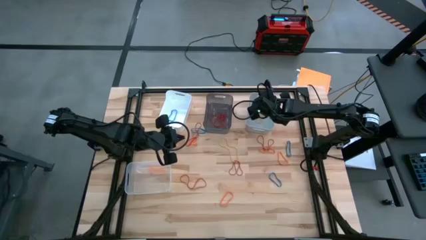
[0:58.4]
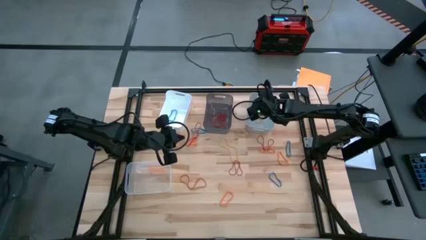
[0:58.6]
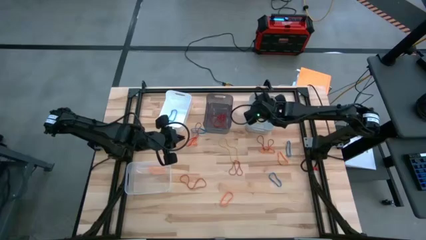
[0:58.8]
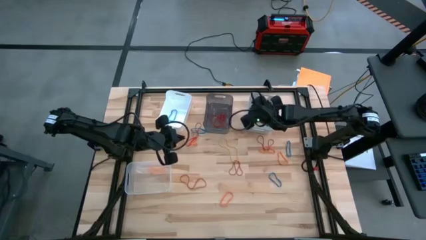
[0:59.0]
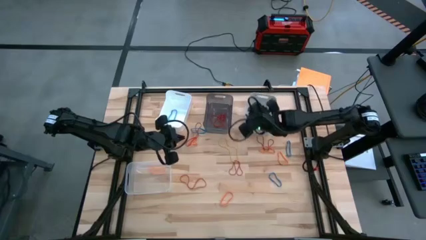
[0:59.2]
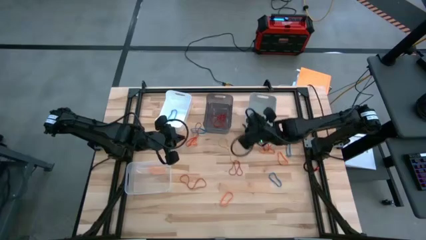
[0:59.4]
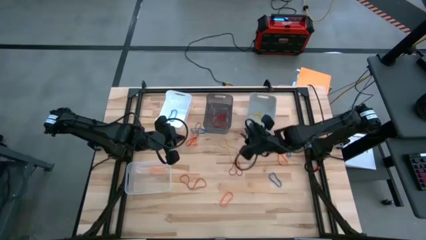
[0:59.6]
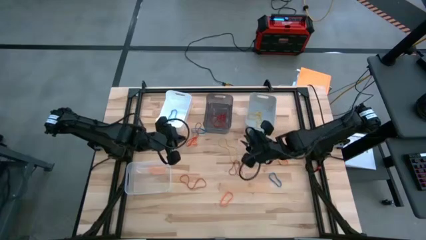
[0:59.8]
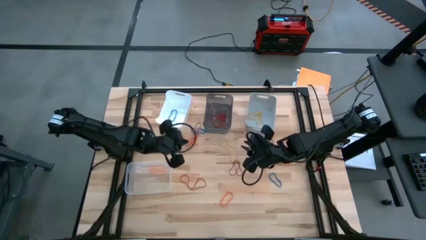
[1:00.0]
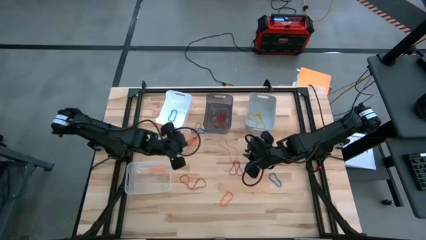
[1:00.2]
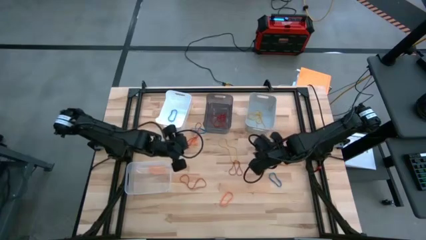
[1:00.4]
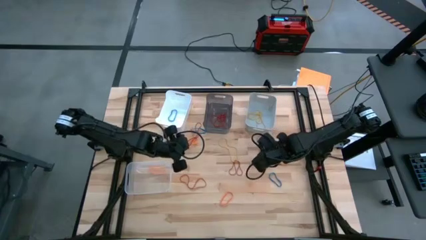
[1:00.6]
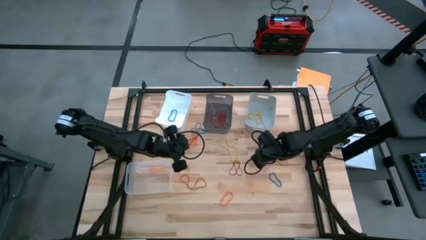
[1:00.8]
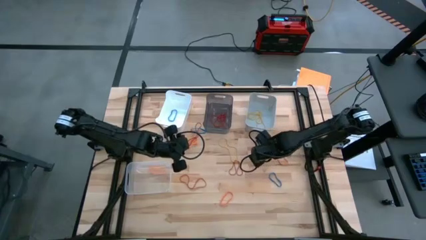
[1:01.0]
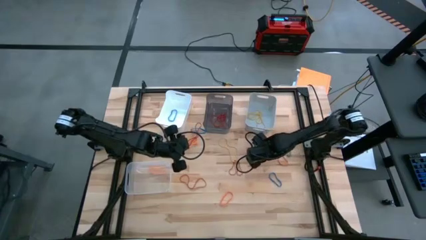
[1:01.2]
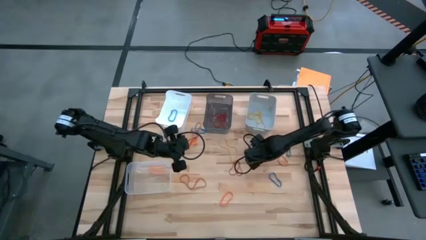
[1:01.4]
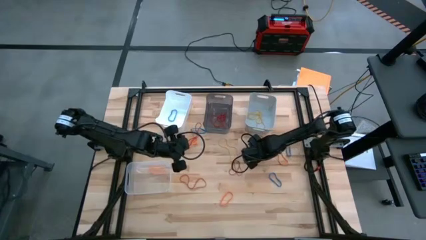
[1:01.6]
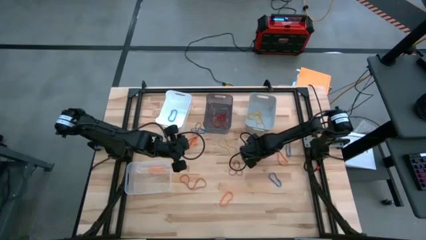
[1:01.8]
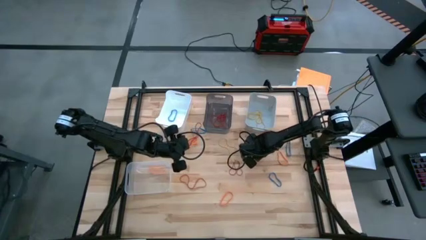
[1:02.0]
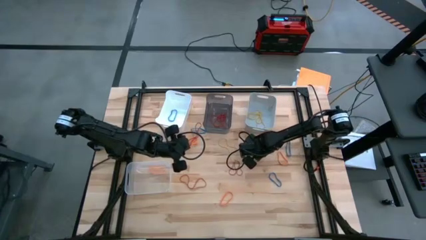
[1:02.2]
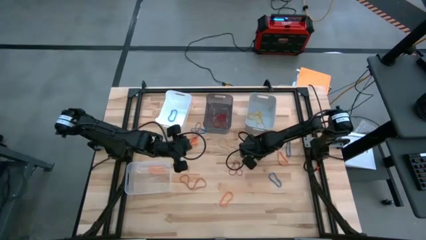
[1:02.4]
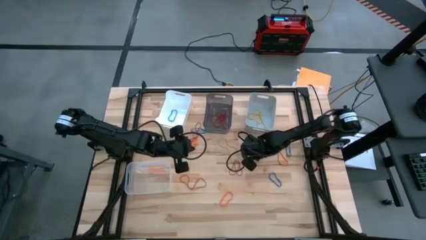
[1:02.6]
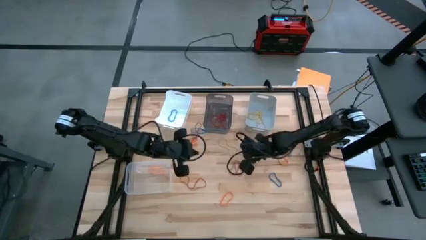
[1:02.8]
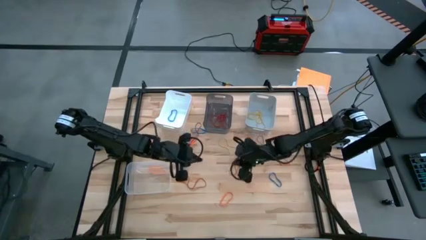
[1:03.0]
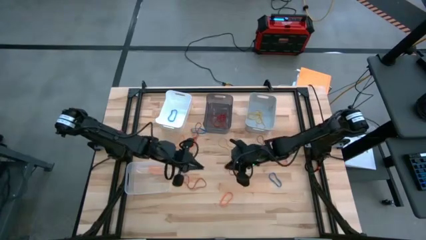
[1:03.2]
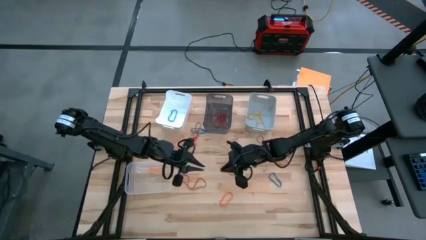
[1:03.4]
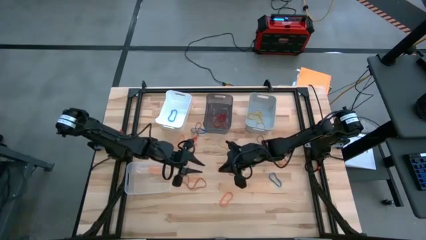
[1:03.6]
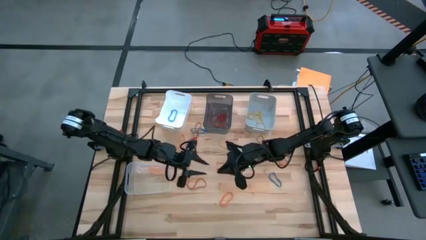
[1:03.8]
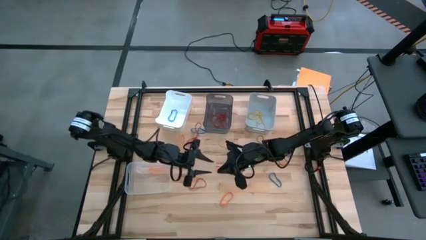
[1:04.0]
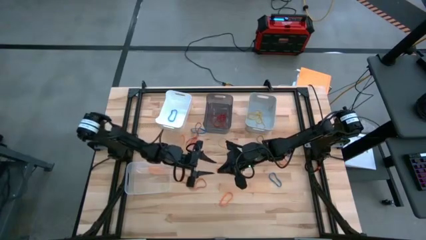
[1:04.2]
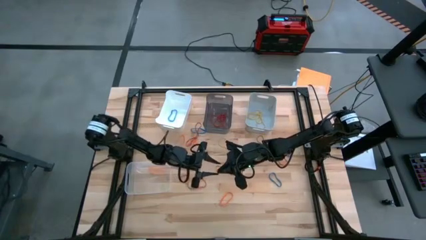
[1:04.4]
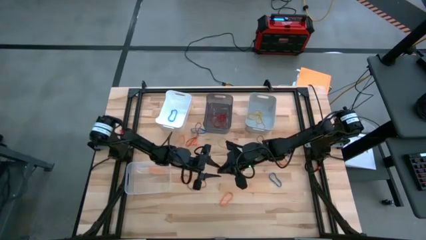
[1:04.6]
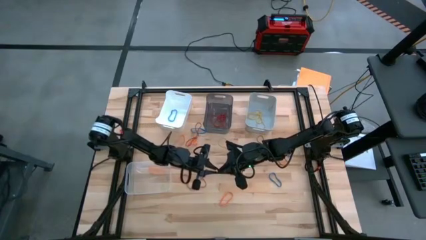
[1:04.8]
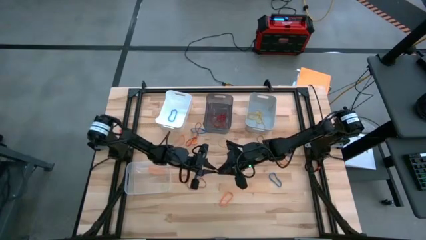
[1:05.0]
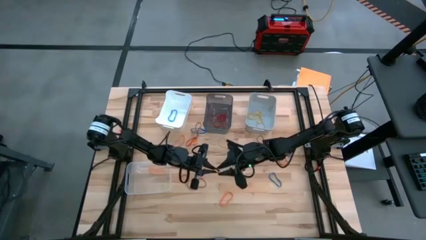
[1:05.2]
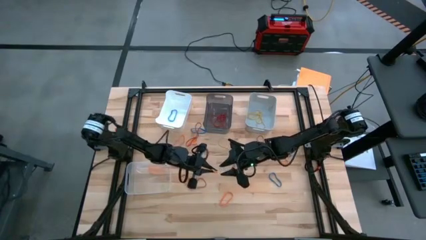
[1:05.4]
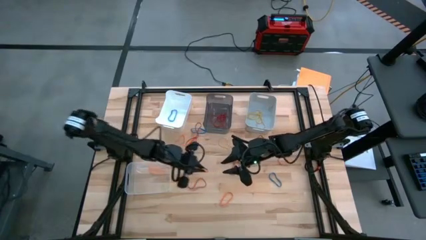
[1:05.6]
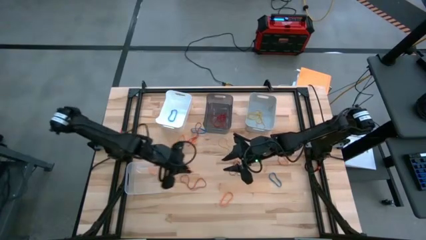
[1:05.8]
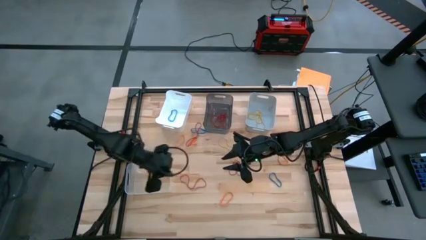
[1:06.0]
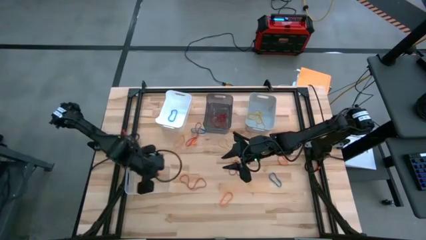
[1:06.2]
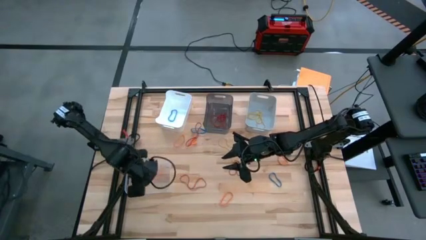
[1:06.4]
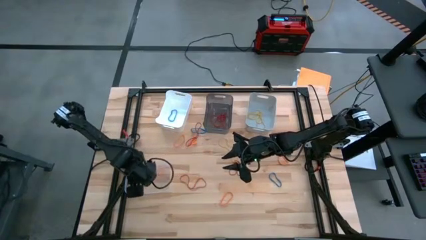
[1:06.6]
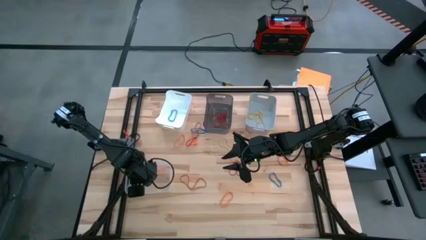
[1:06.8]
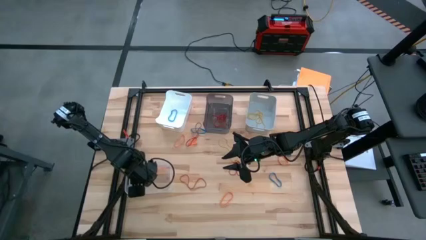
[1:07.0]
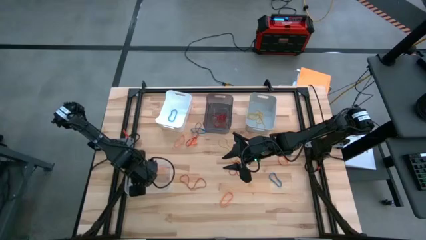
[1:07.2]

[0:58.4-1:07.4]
Task: Sort rubber bands into baskets
Put the orange rubber band into the transparent bin

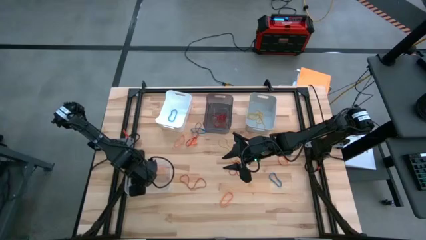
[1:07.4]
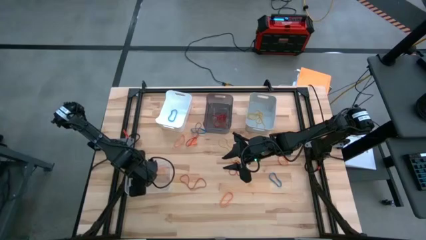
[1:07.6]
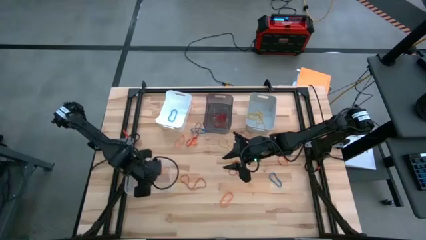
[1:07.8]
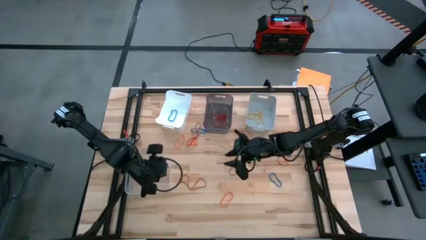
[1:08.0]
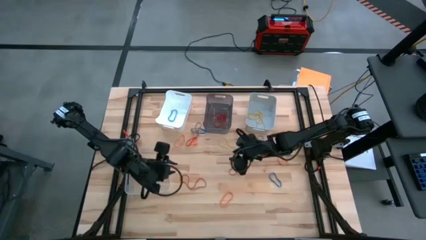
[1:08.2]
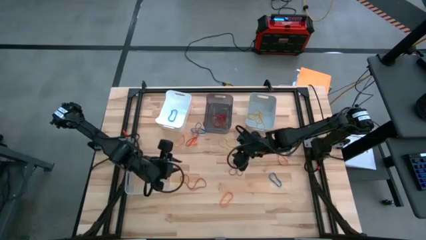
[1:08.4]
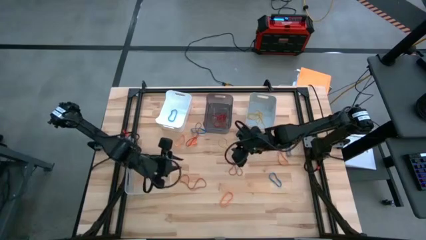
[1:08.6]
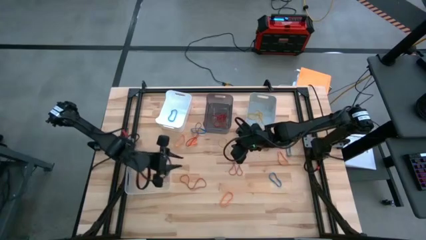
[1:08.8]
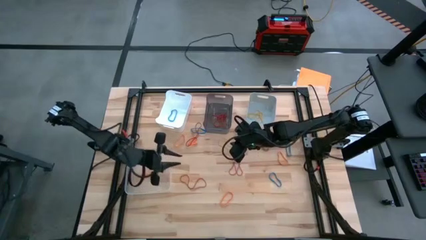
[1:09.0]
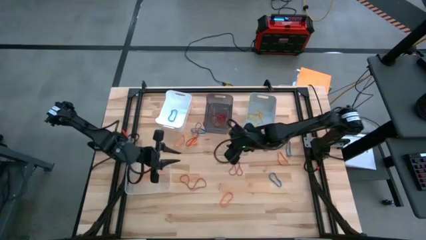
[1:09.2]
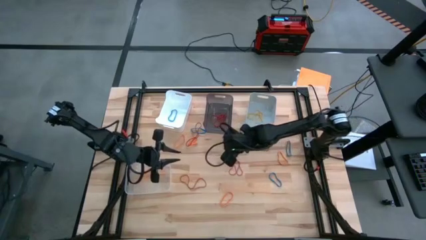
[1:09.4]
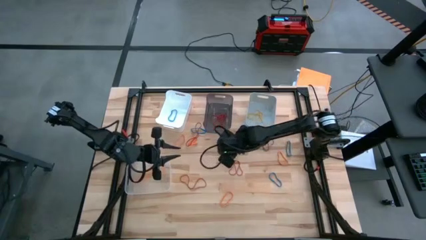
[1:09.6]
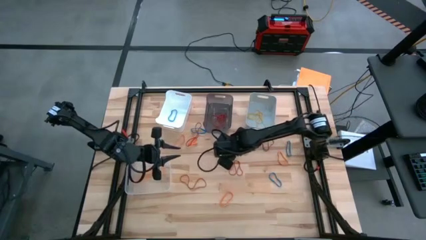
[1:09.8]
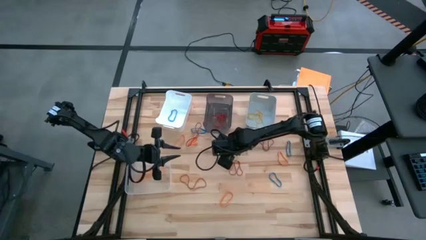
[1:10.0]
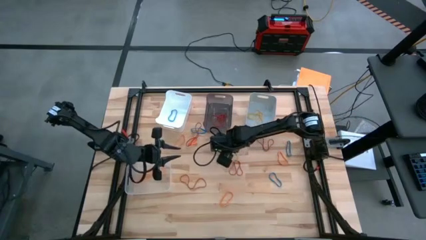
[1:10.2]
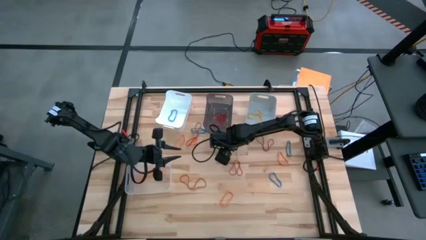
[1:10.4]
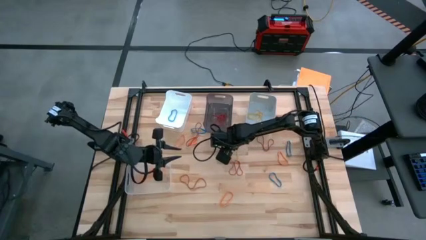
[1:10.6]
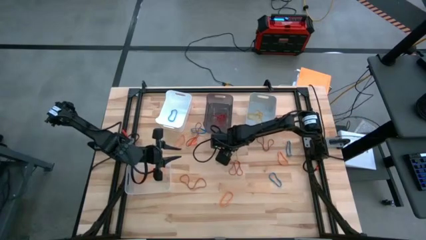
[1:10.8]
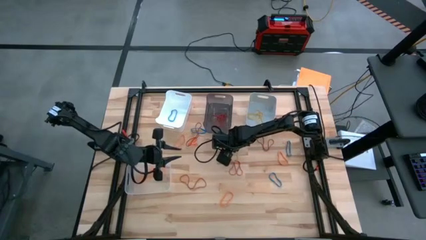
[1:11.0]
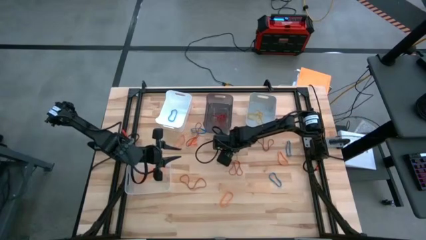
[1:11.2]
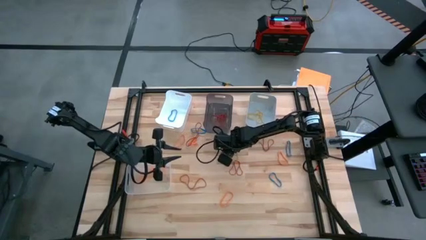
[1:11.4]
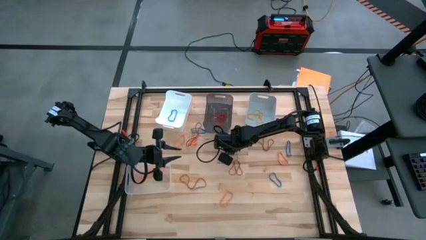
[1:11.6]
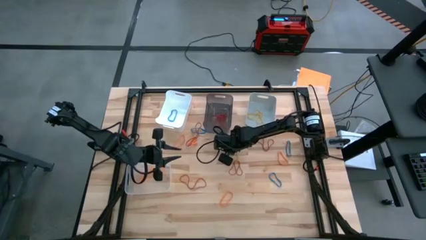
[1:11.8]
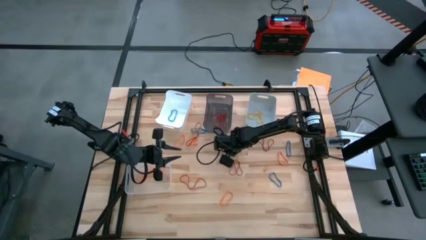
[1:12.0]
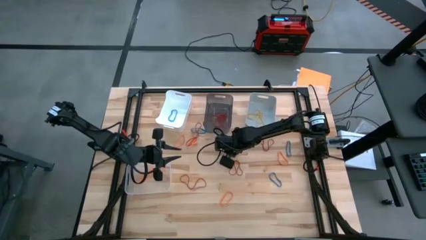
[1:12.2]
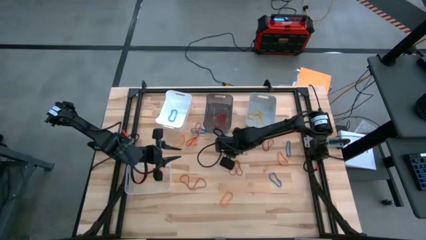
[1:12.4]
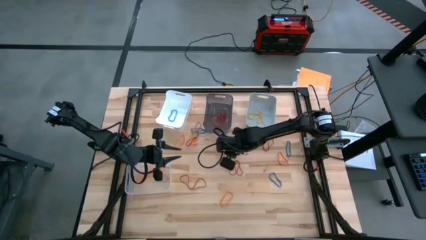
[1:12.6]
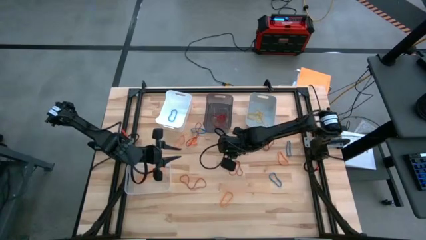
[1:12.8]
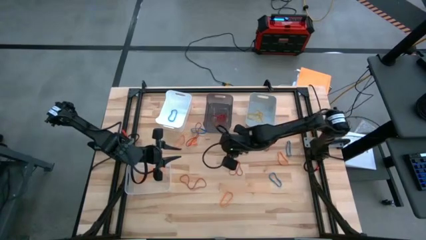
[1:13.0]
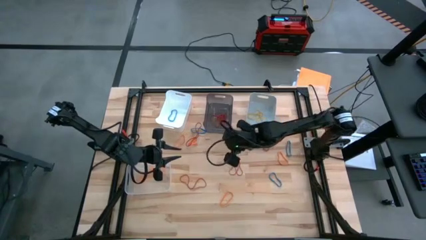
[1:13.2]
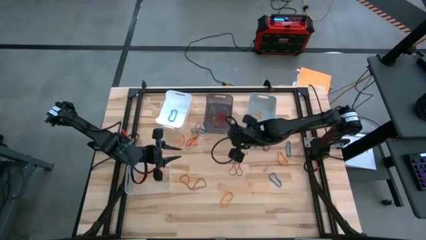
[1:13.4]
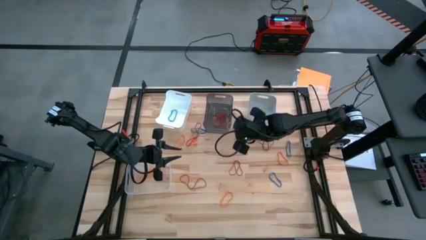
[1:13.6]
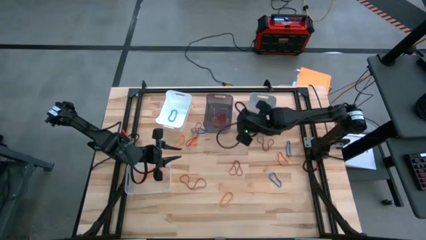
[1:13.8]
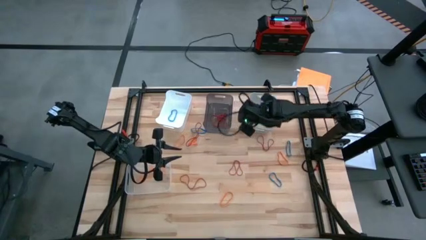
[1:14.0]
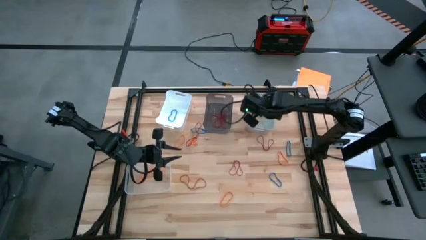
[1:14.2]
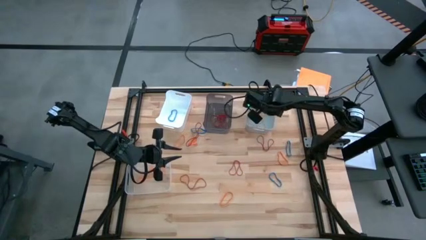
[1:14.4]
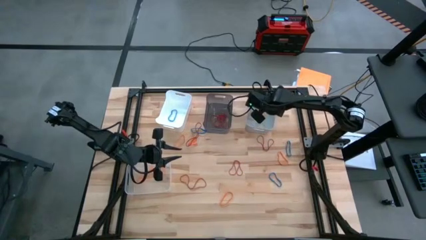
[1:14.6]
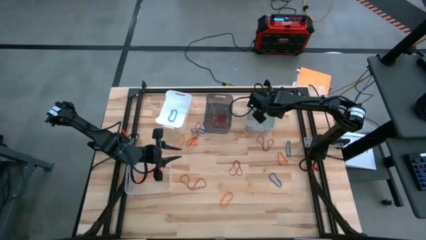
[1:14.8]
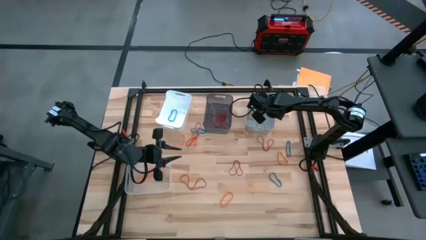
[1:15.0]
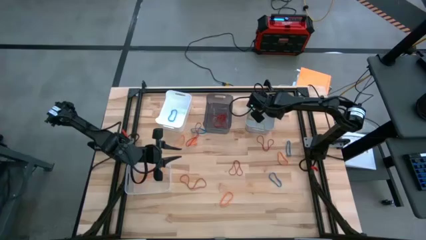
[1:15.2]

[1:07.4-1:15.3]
Put the yellow rubber band into the gray bin
